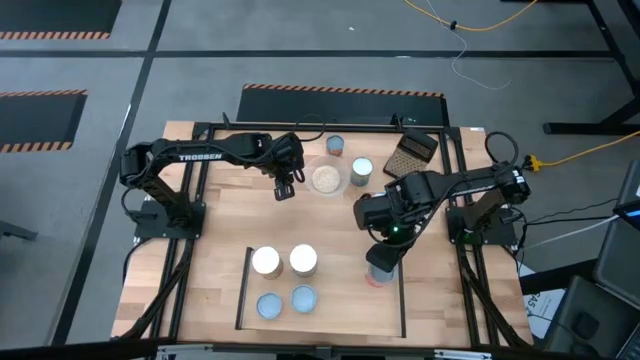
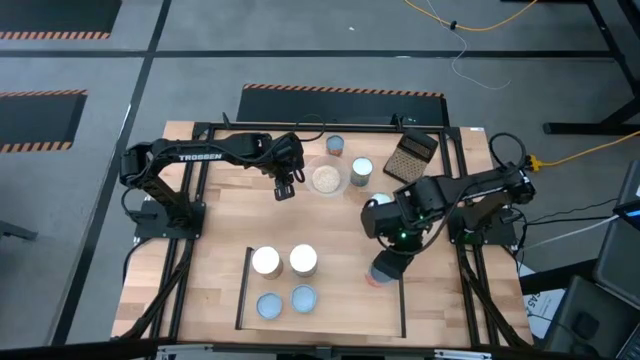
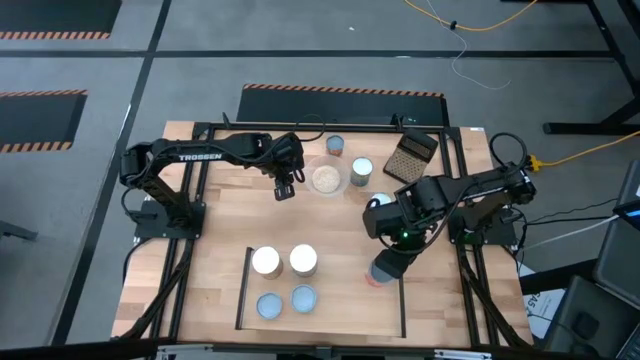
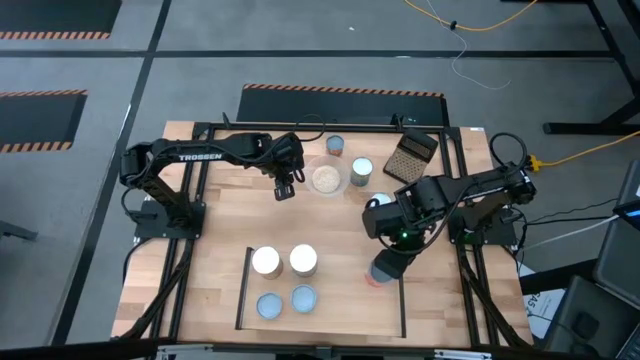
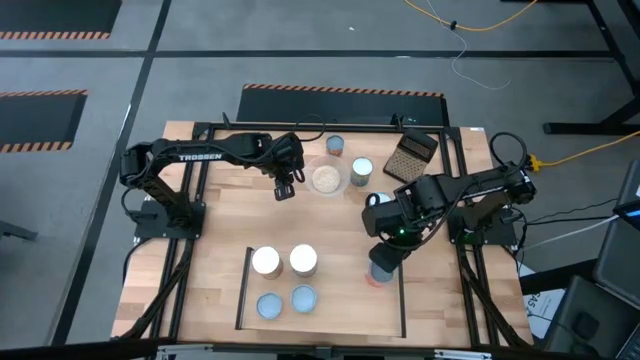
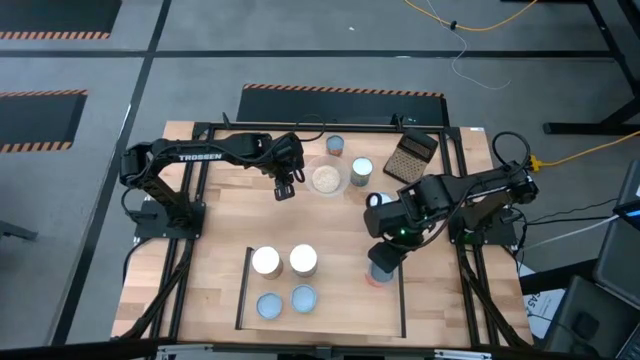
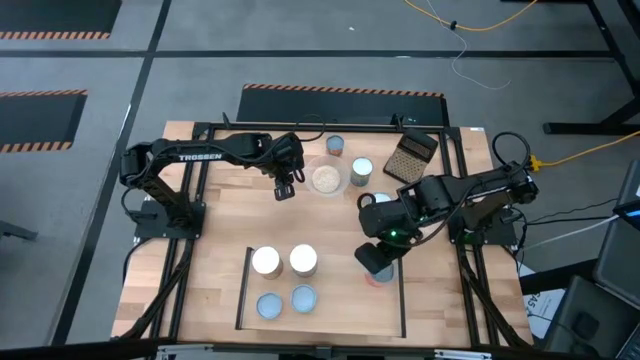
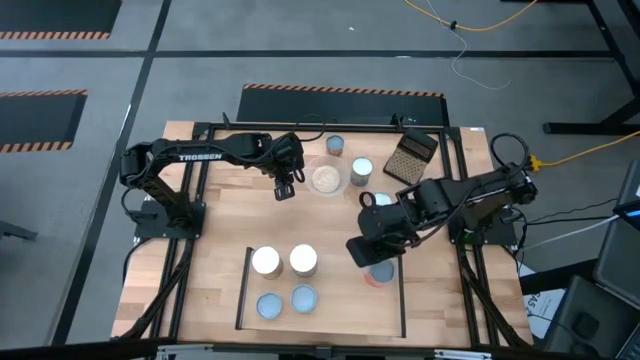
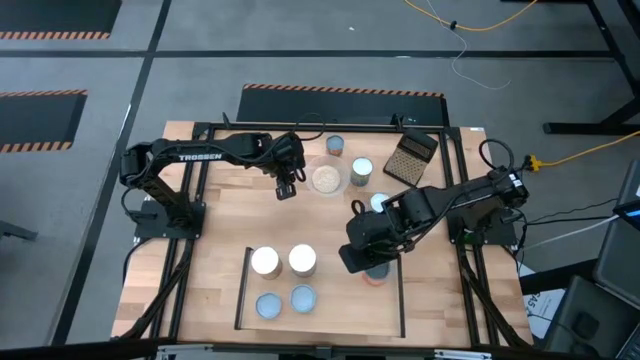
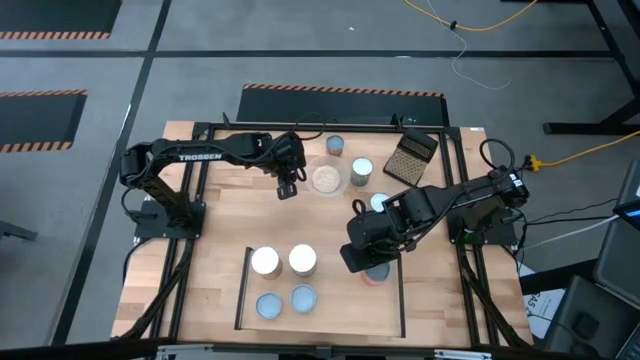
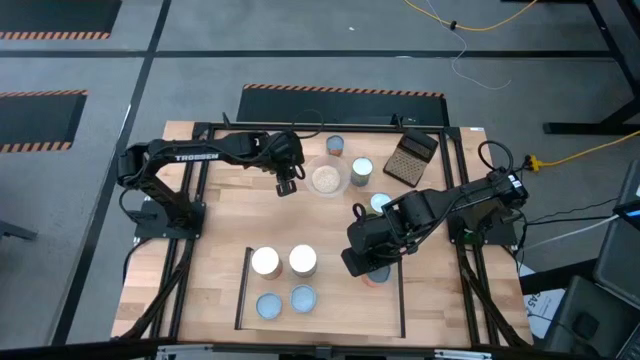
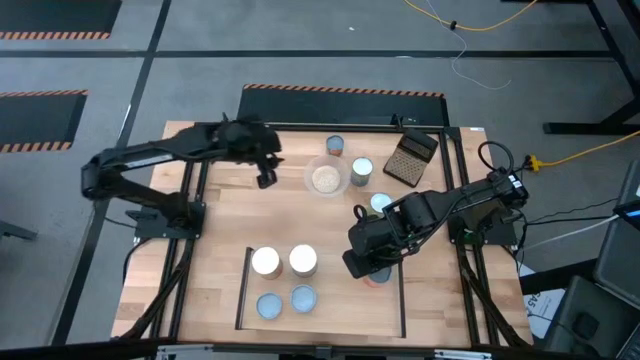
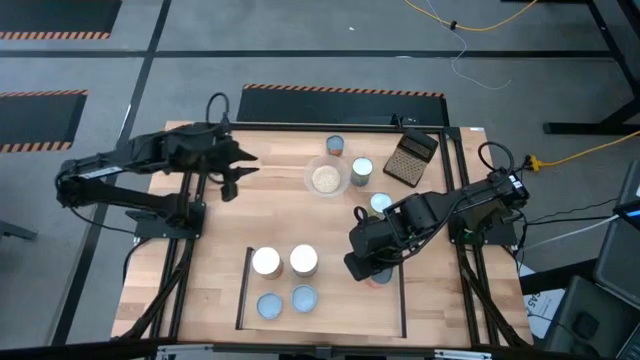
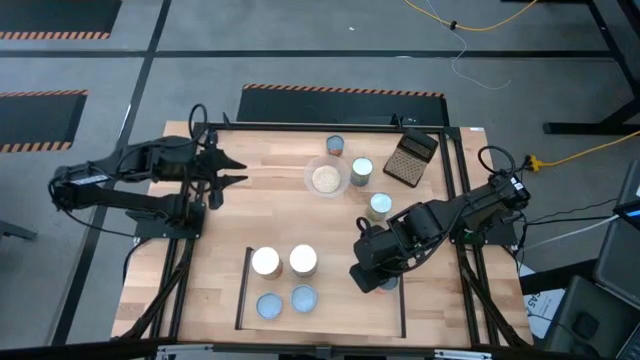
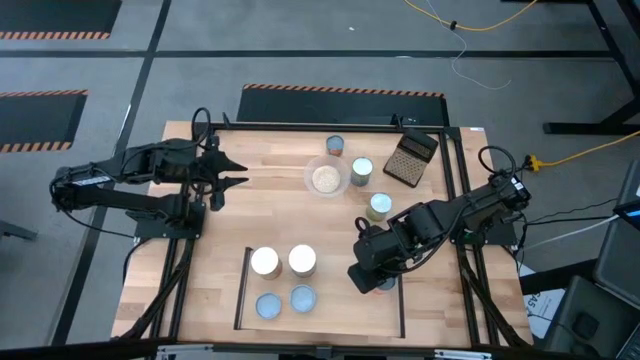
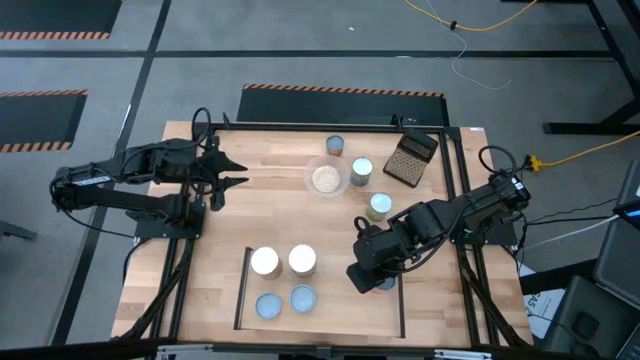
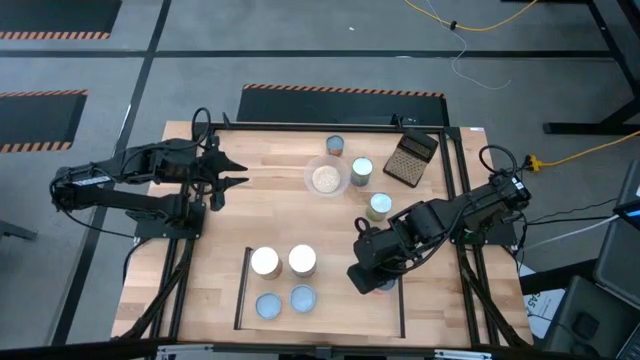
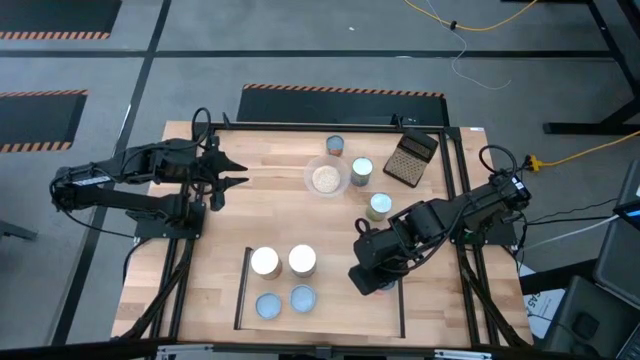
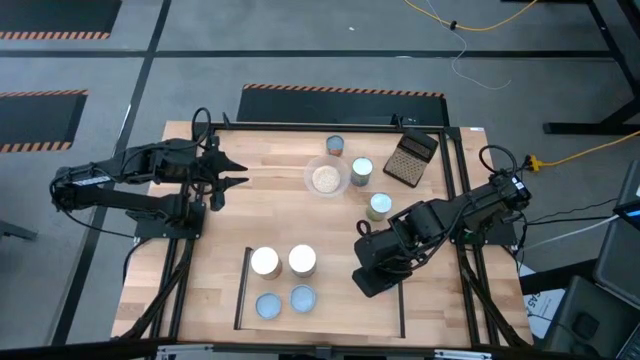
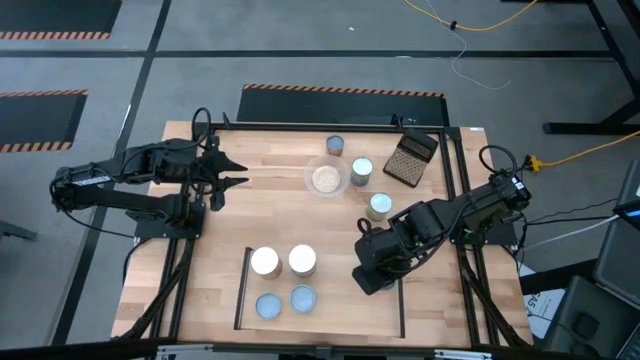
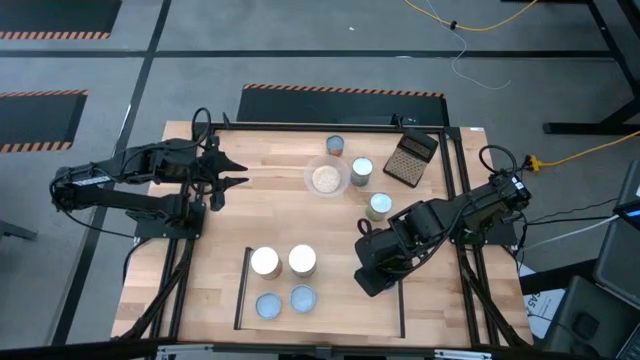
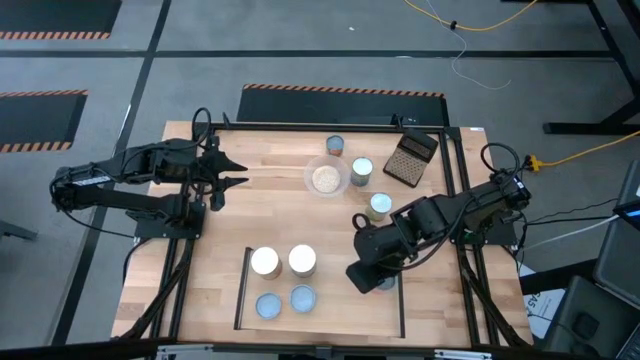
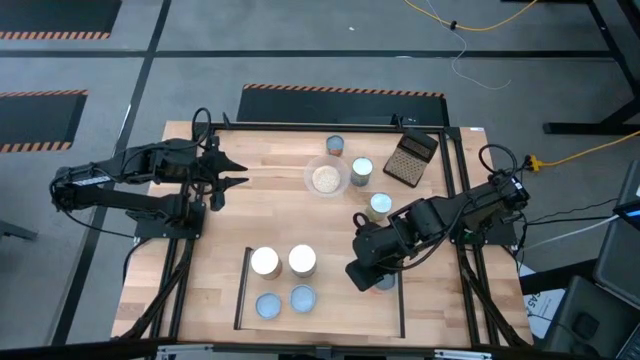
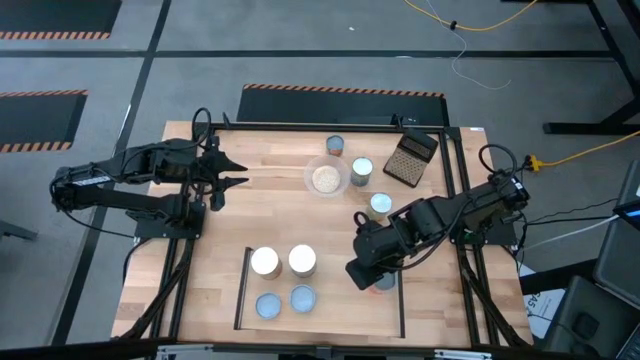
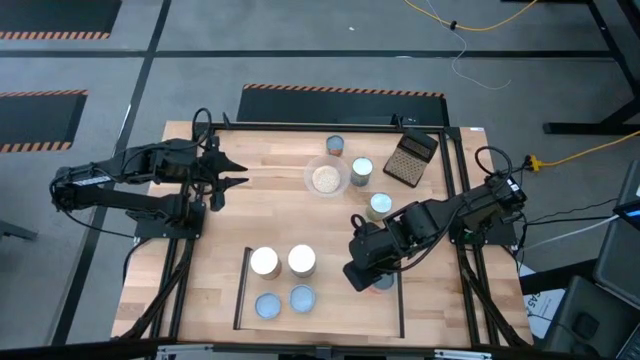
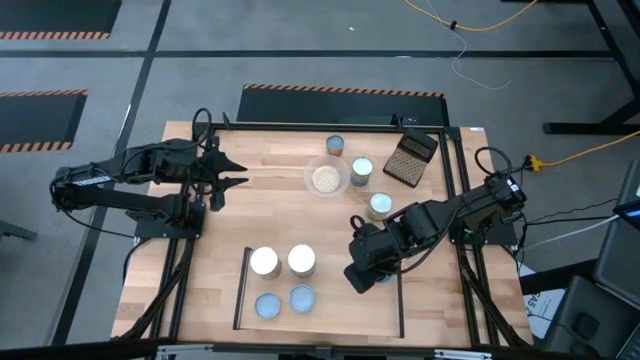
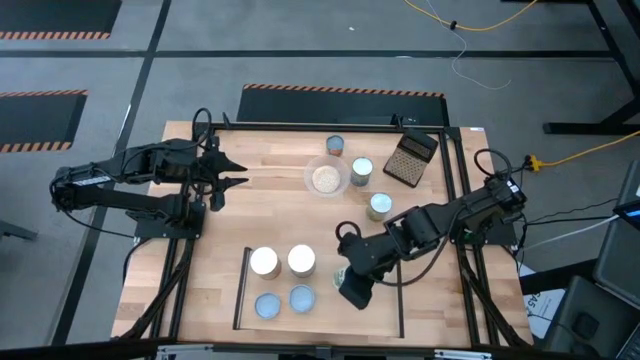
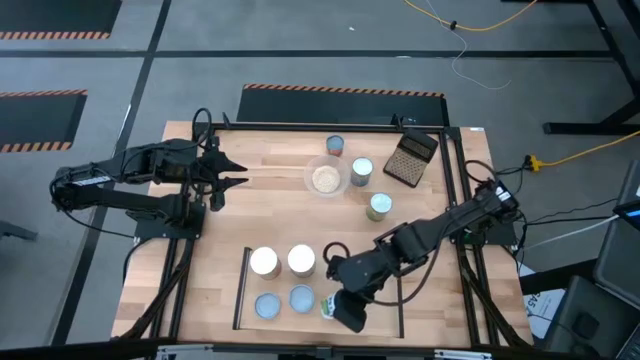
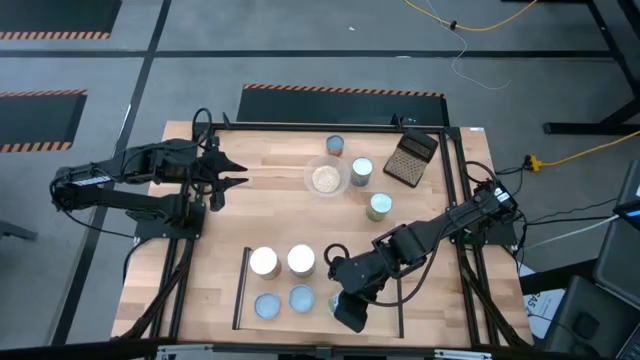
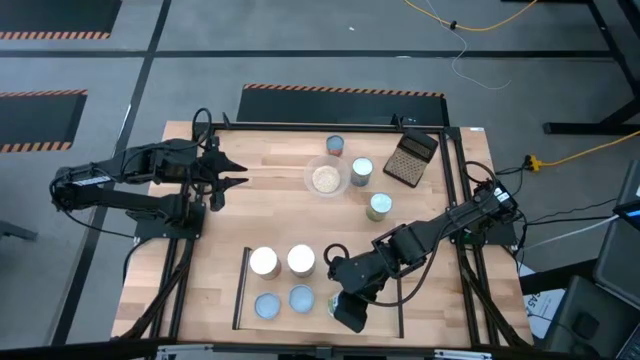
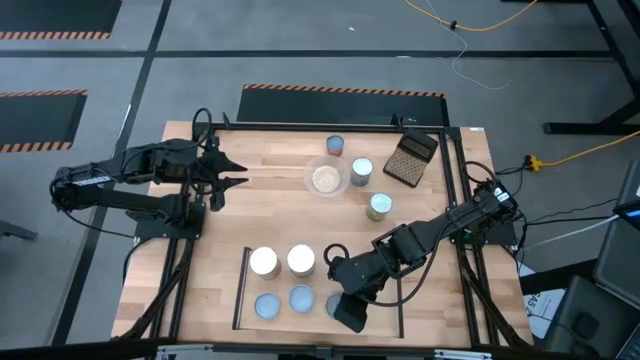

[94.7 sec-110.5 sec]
Task: Pick and place cans onto a shelf
Put the canned mixed fruit on the shelf

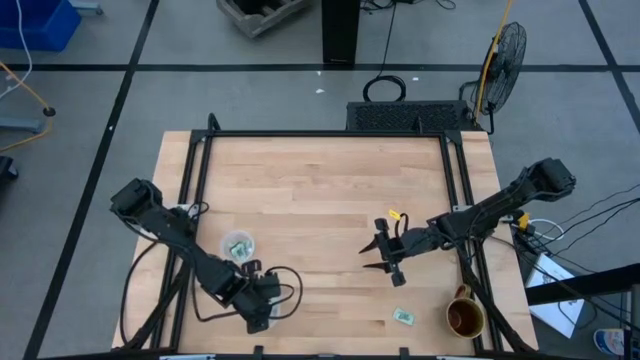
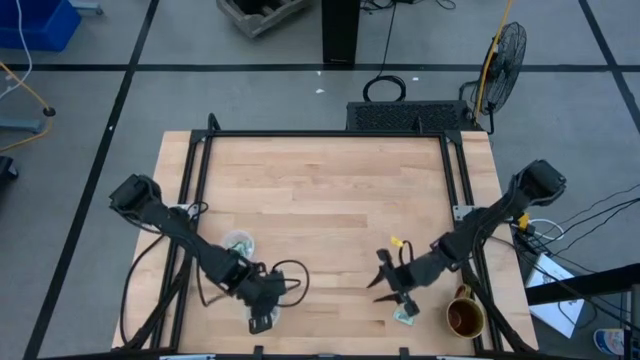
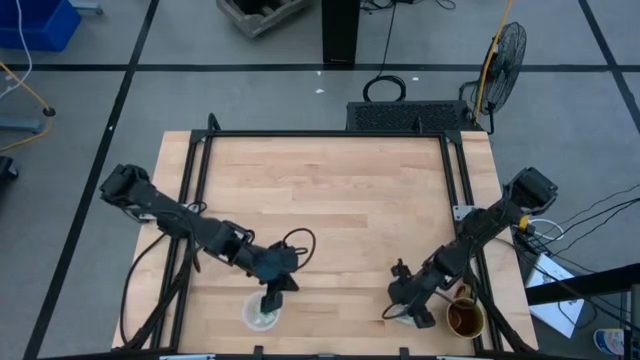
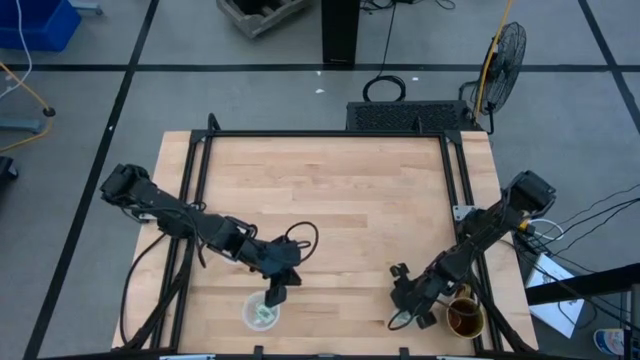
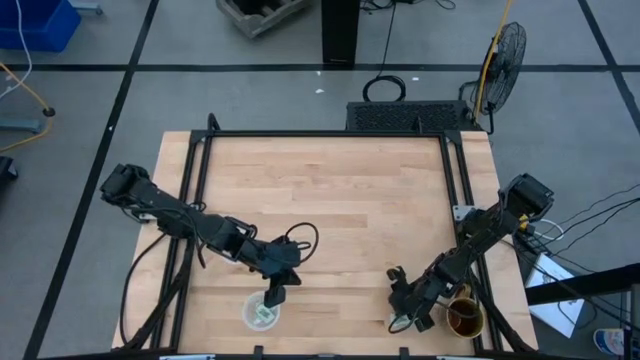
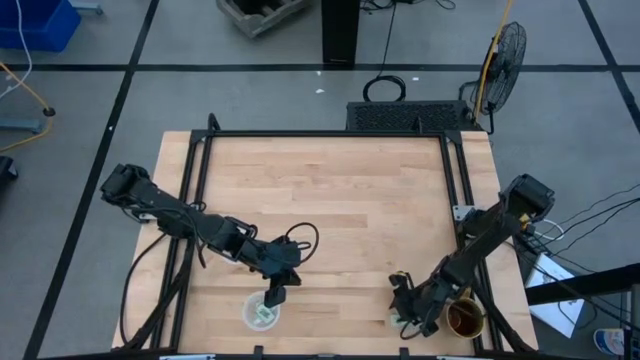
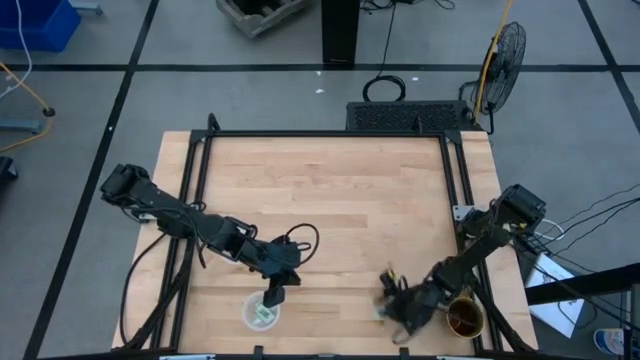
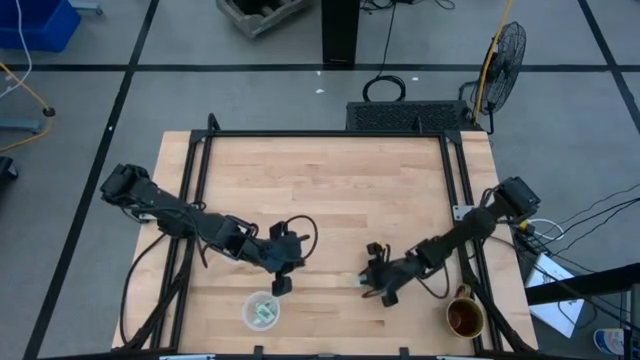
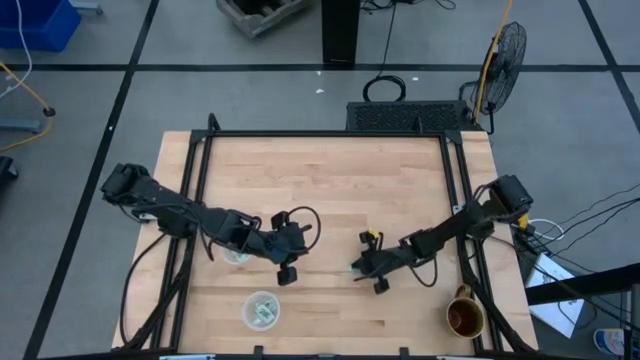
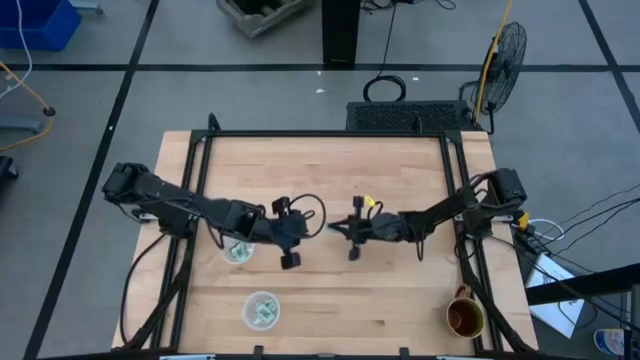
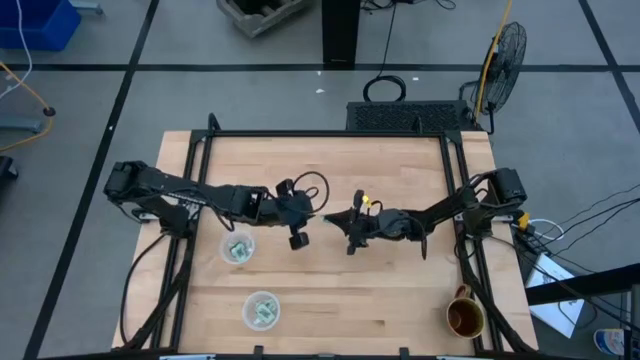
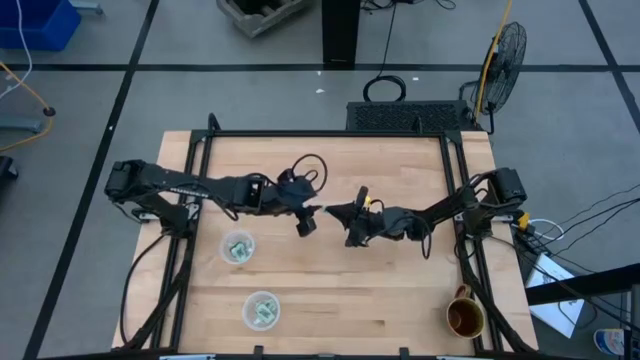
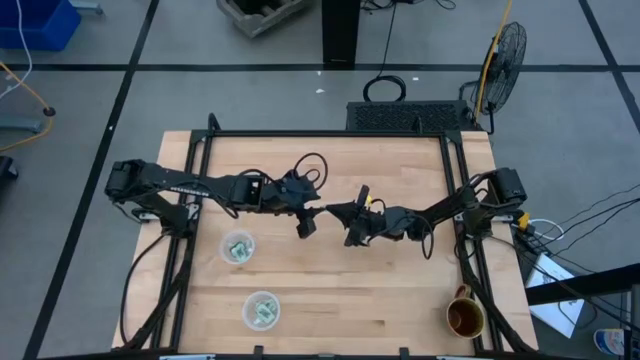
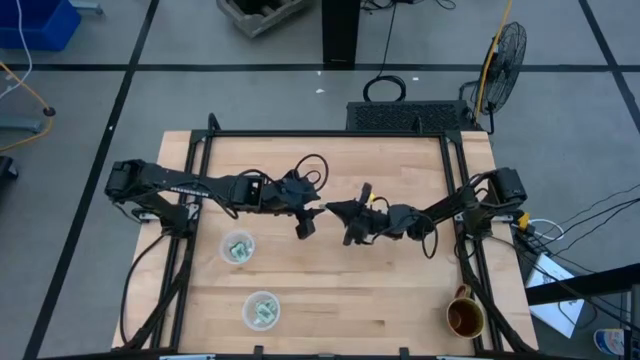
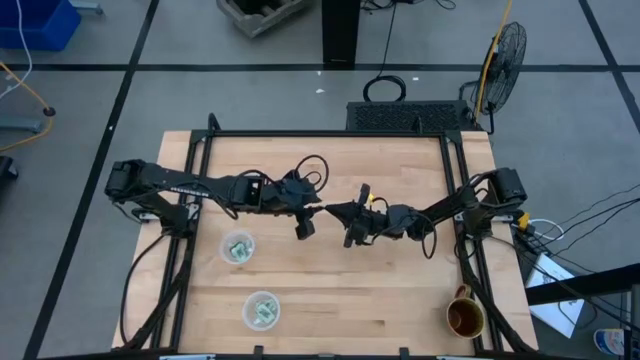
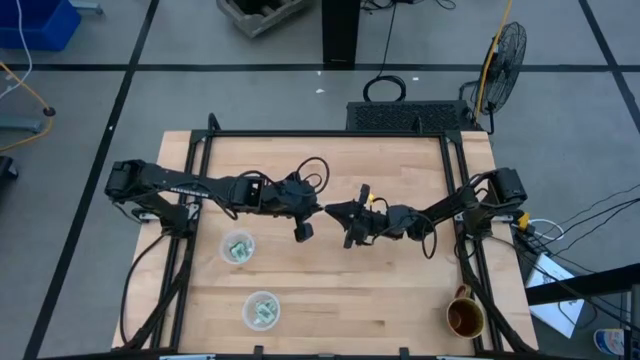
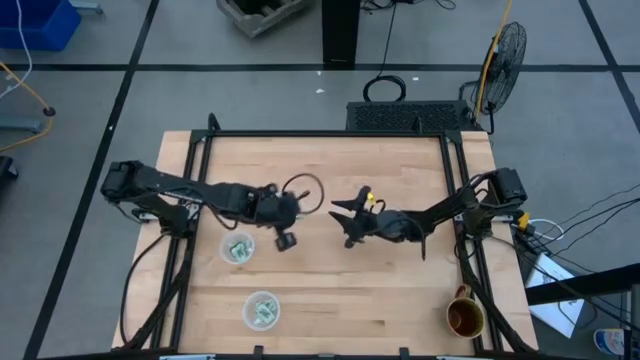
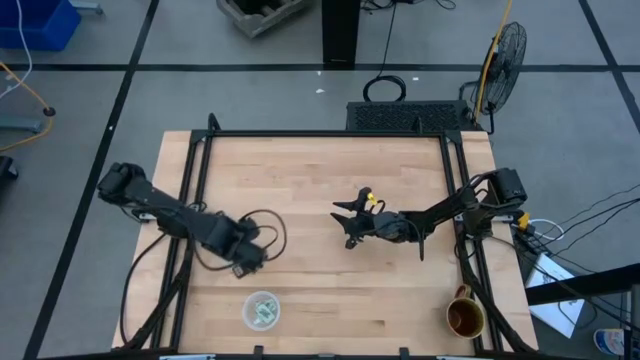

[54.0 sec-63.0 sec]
Task: Pick and place Stevia / Truvia into bins
Put the stevia packet into the top container
